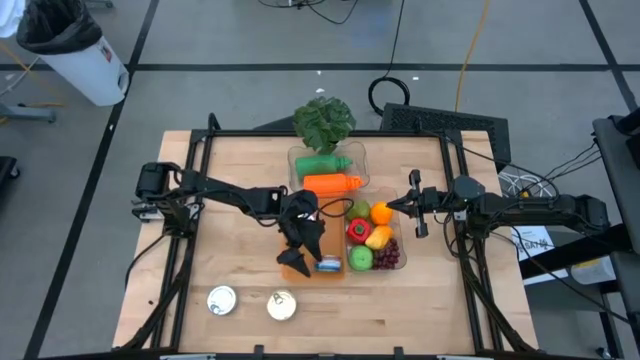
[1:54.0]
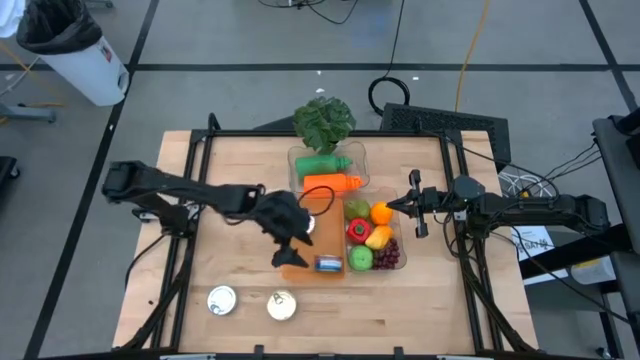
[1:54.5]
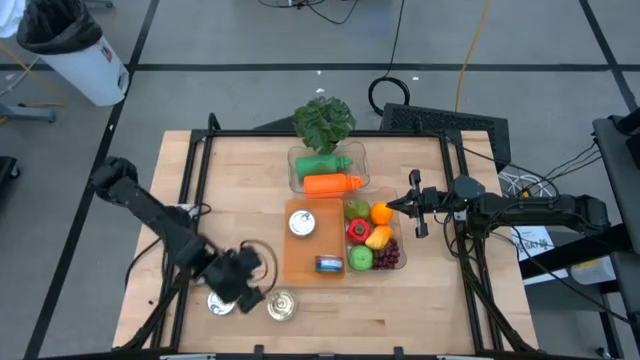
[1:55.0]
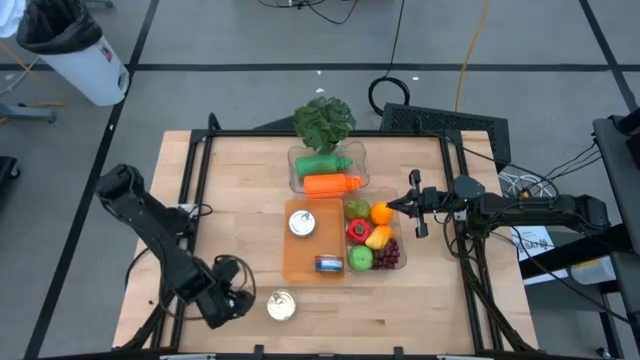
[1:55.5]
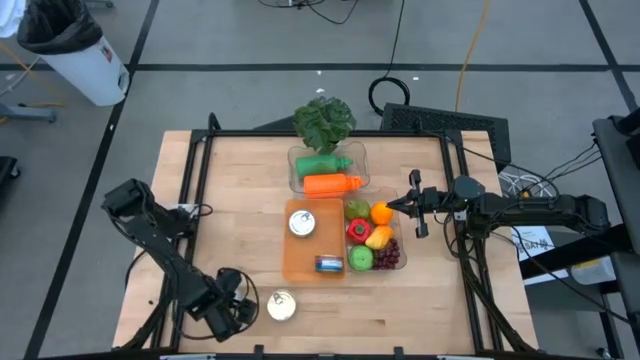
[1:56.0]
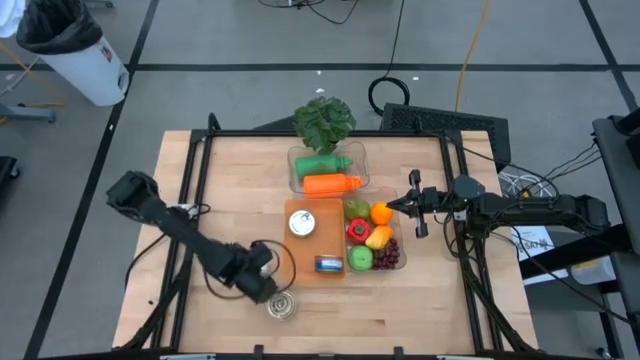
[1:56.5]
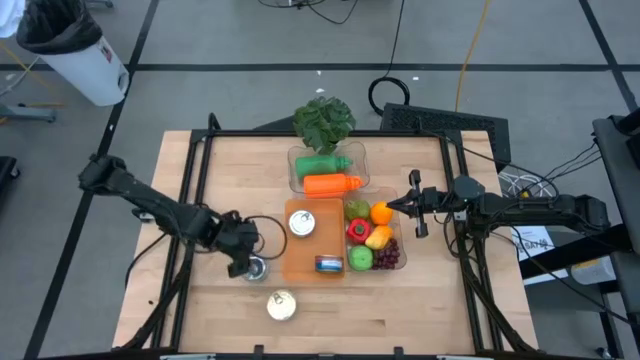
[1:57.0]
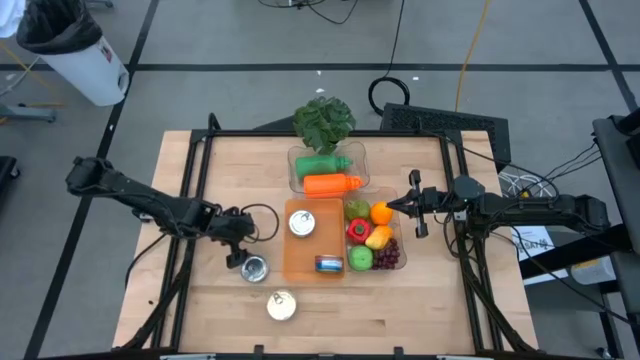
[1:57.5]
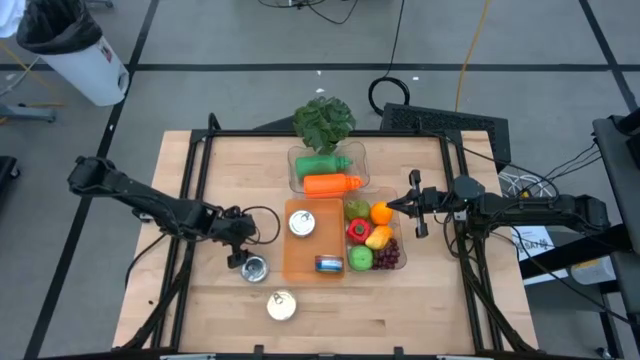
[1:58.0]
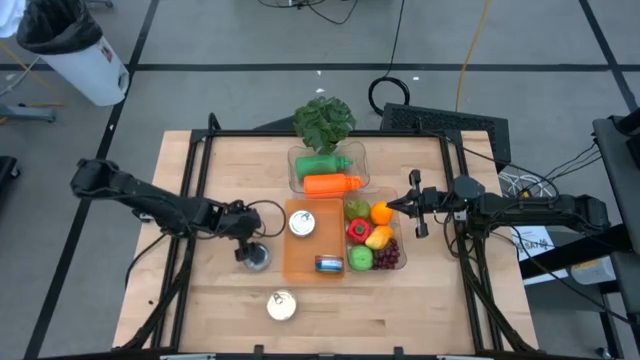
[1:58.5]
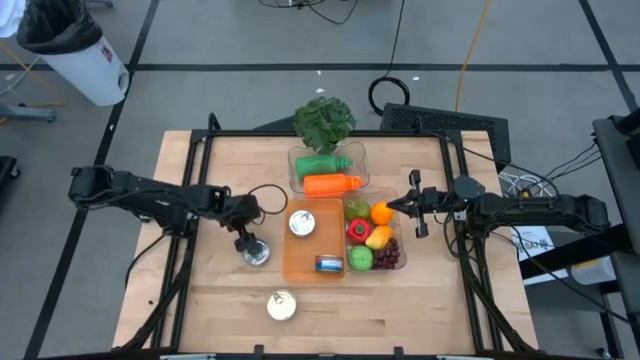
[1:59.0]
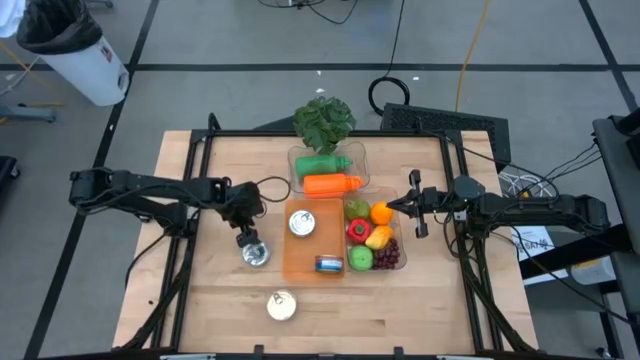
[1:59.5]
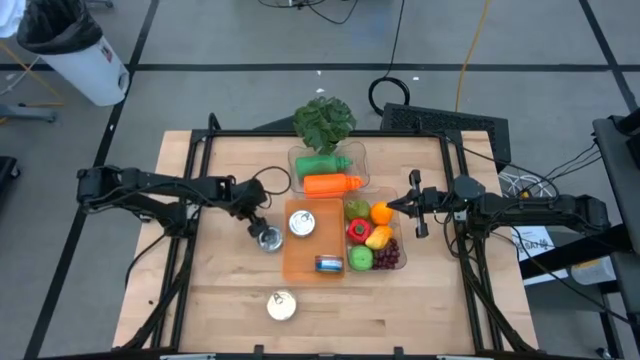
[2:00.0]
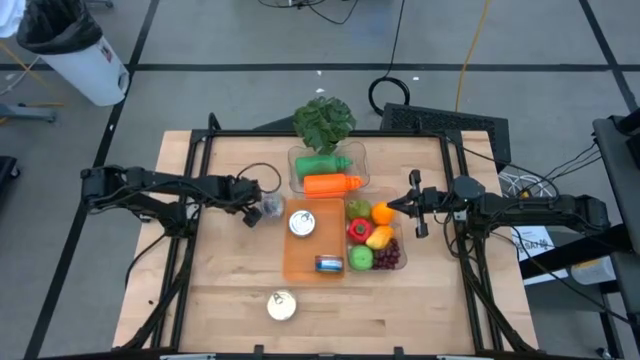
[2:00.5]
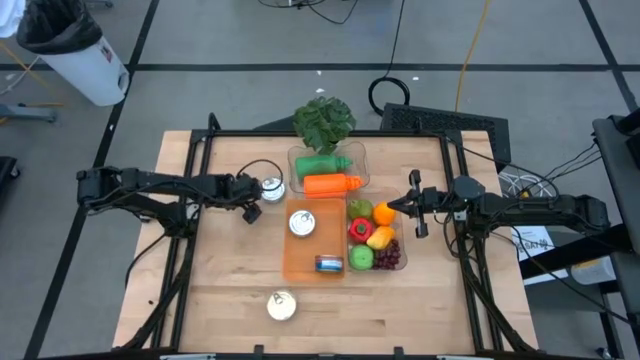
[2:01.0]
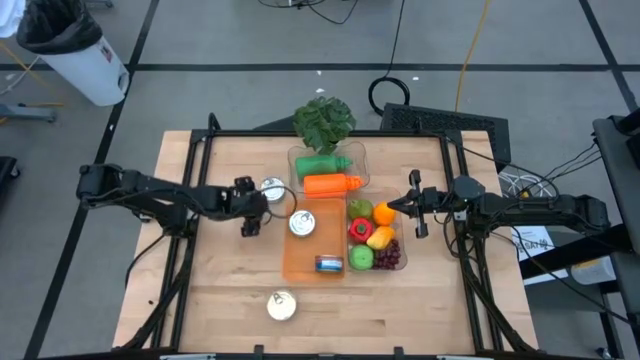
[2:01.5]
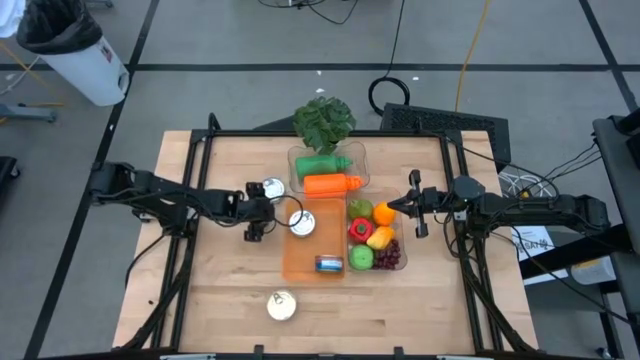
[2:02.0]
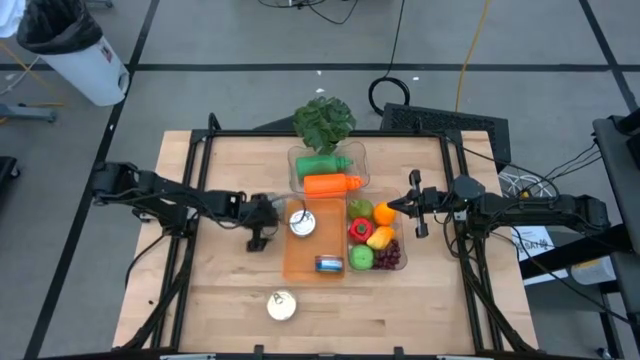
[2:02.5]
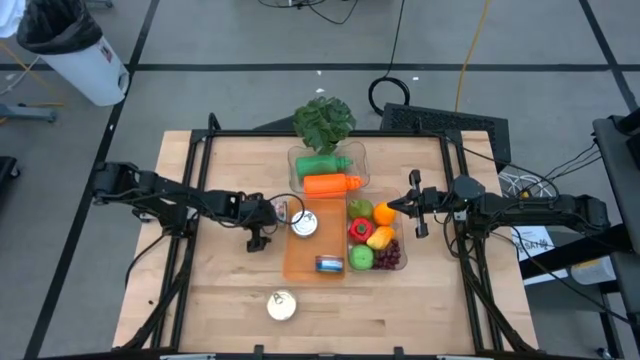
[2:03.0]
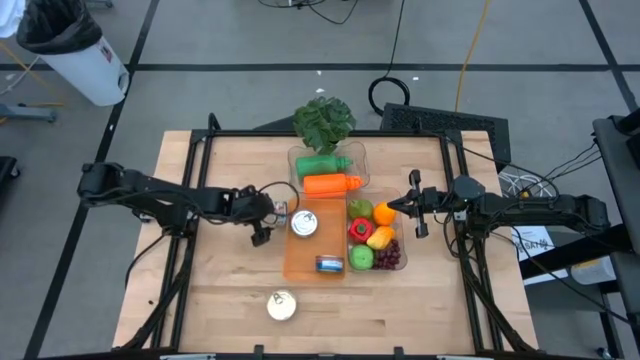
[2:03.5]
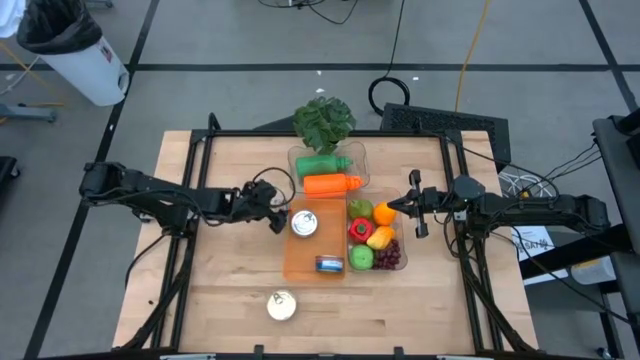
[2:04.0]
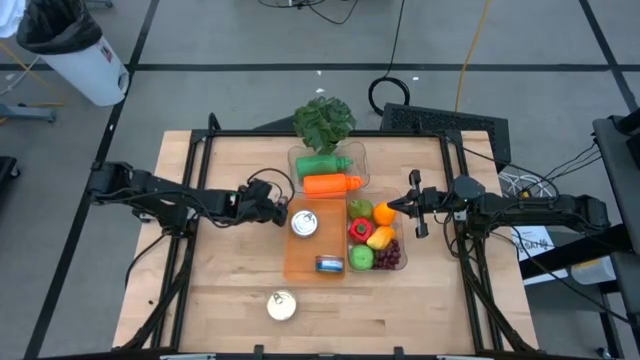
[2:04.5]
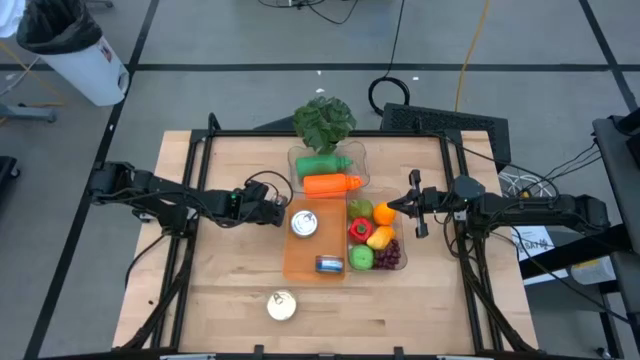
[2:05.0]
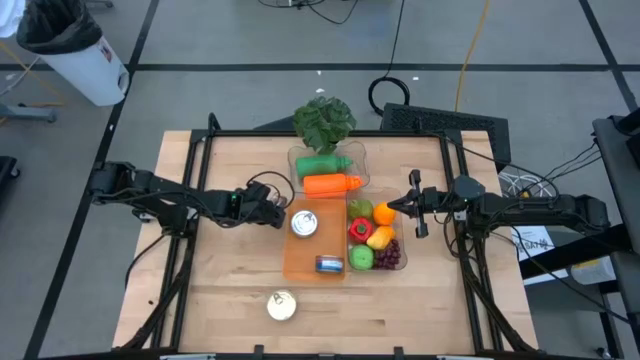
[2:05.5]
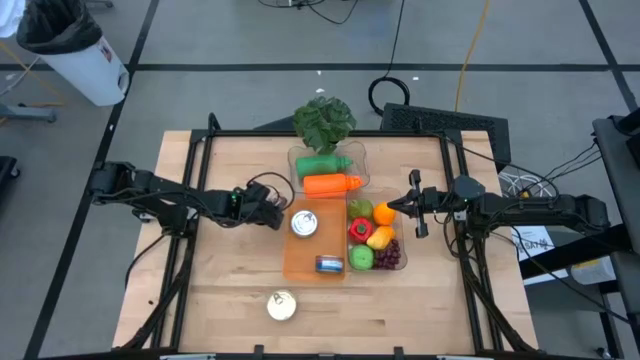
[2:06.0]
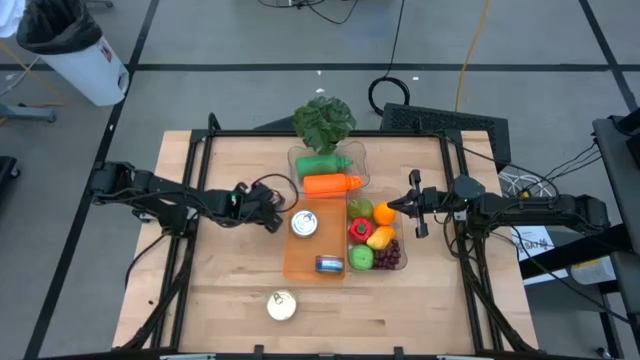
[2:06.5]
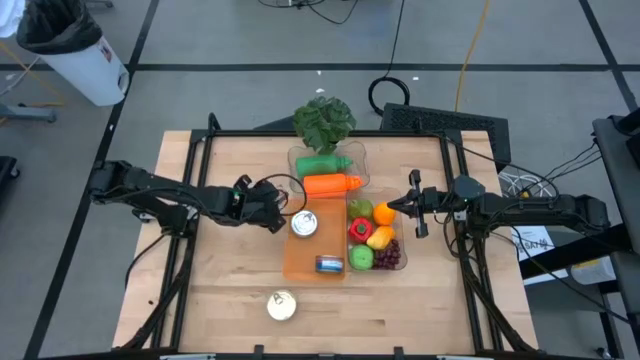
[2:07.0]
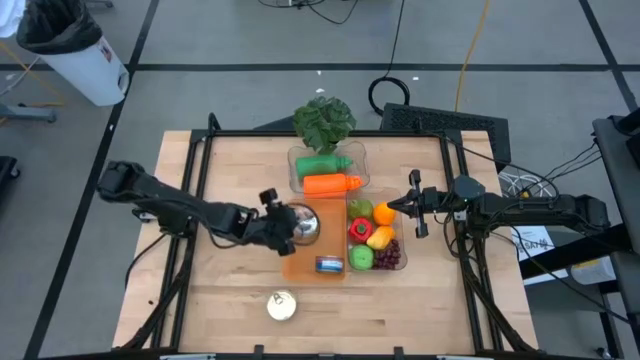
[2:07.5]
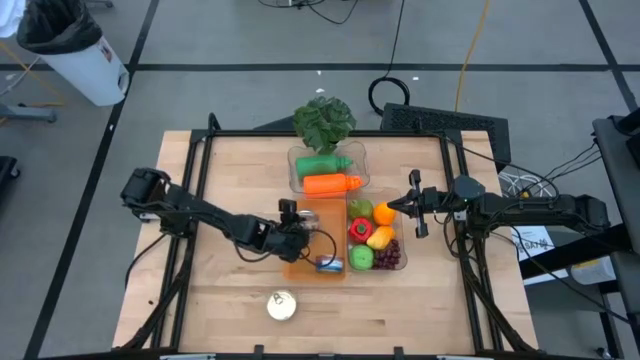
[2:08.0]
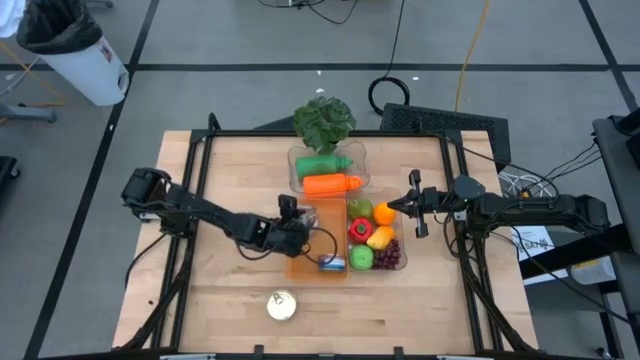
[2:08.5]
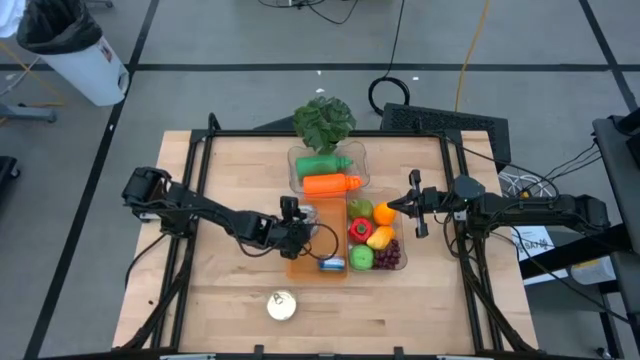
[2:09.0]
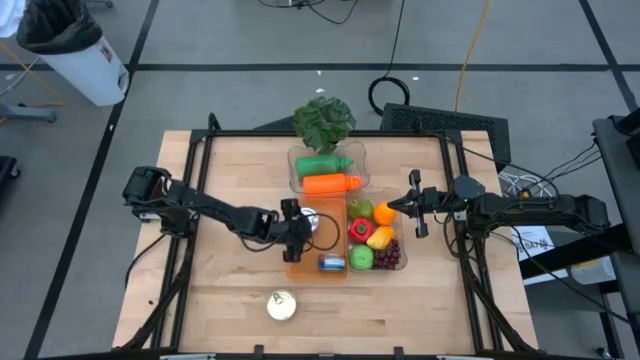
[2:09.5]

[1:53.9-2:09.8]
Task: Pick & Place Food Item
Put the green tuna can into the orange bin

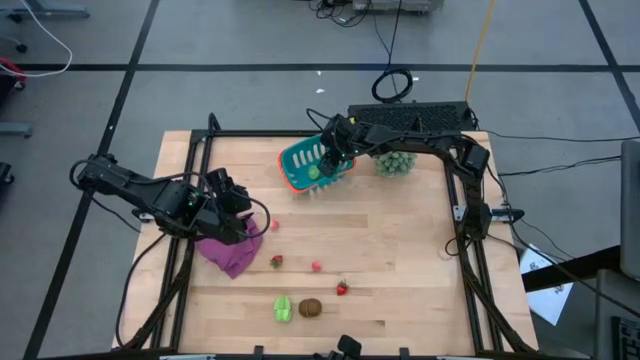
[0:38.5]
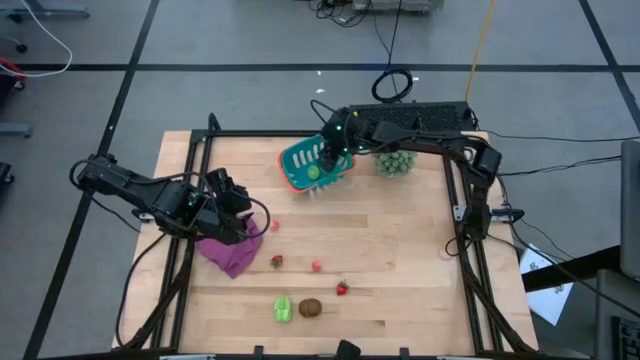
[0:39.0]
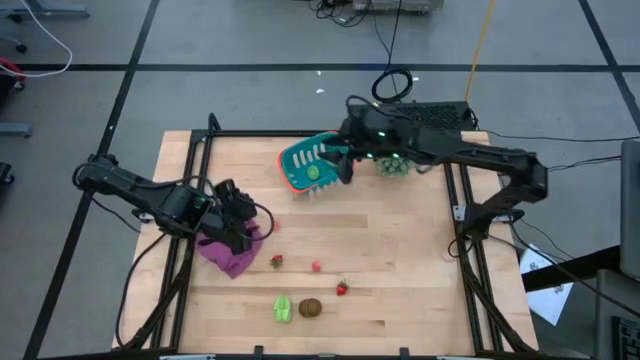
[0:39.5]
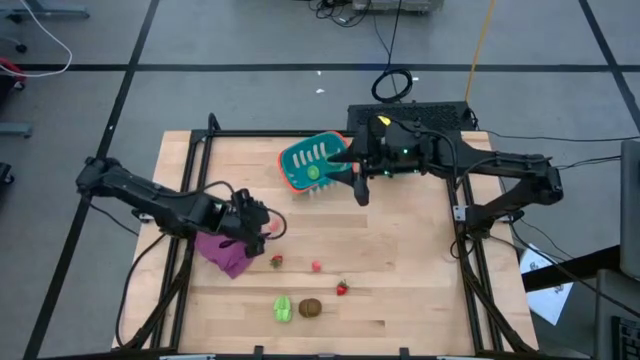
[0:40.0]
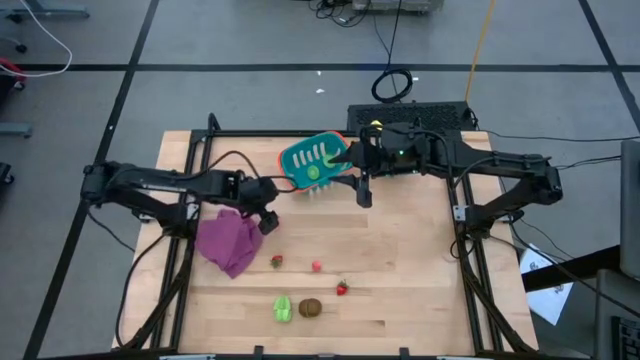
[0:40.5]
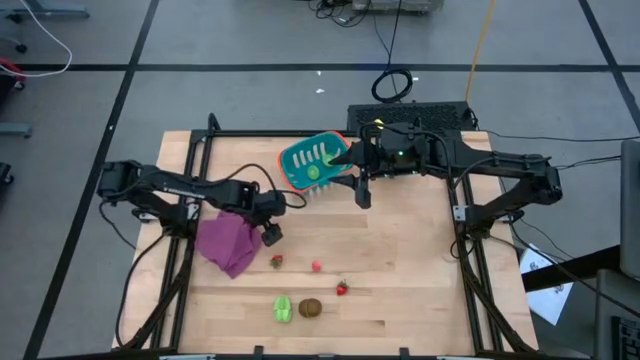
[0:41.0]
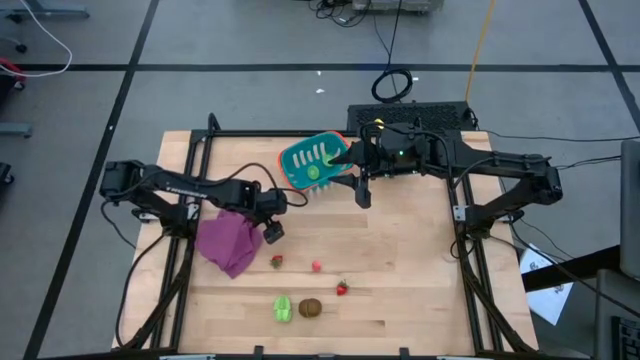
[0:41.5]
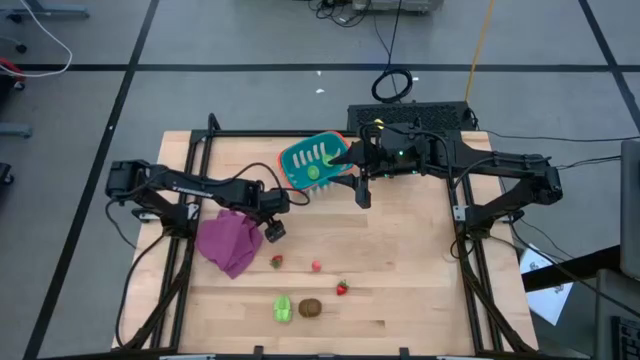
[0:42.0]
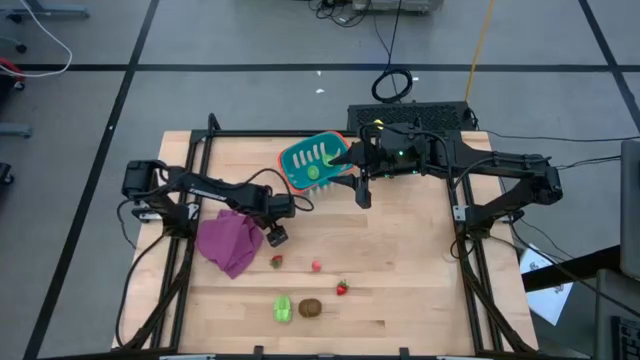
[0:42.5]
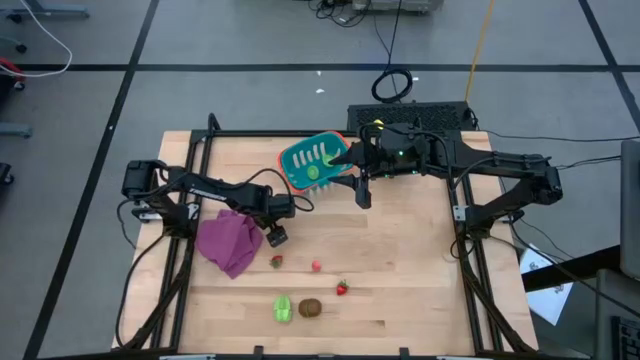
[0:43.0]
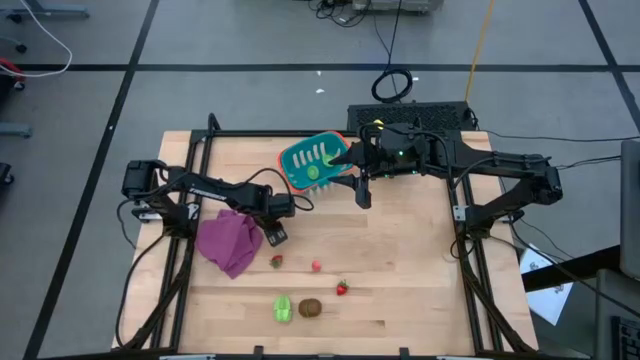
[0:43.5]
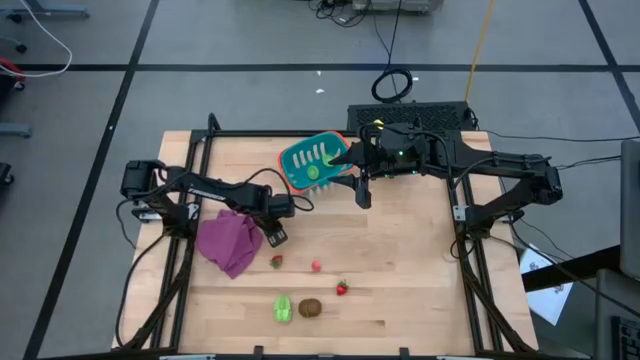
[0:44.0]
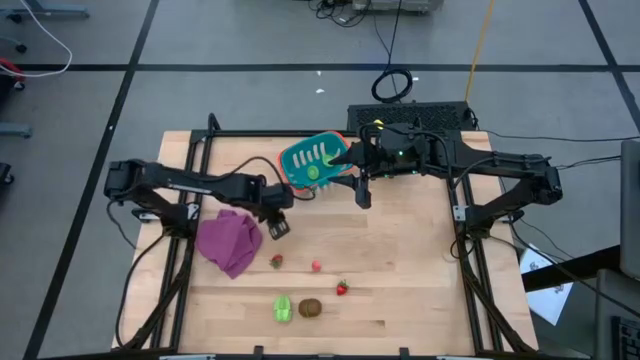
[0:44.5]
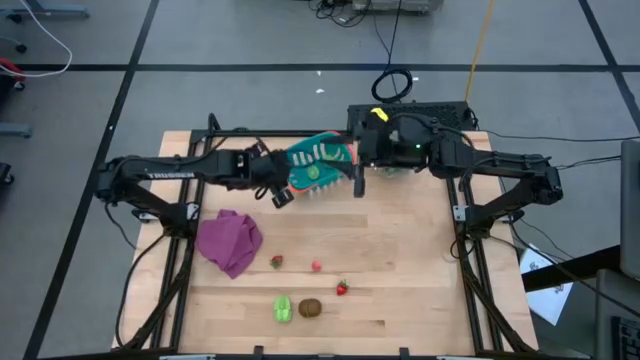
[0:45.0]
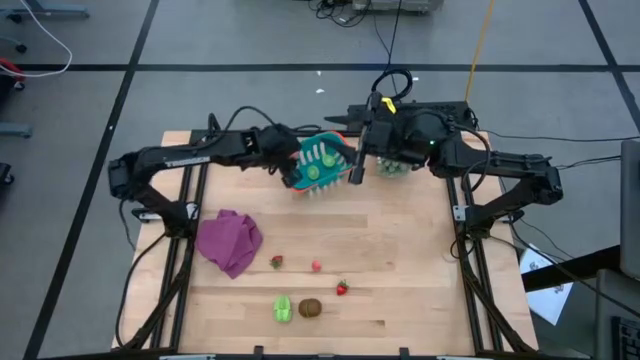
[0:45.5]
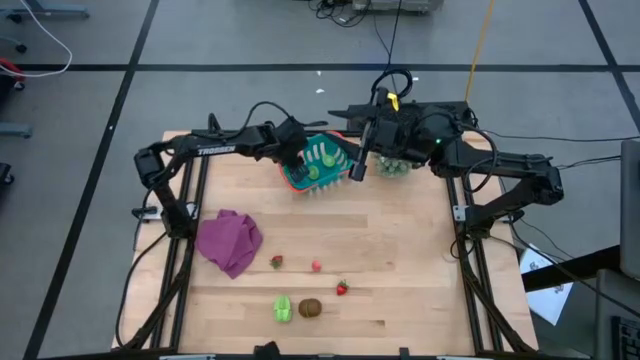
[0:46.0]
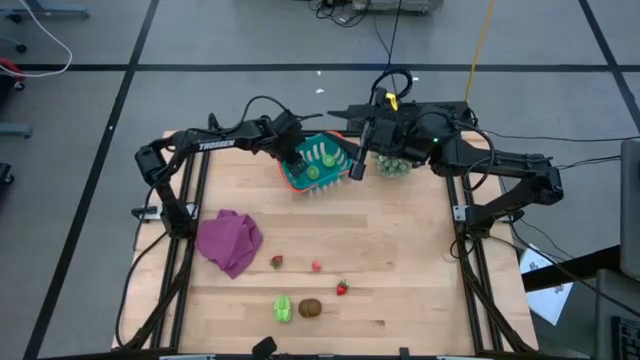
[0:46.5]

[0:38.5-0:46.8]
Task: Pick and placing Produce into tupperware
Put the top lychee into the blue basket
